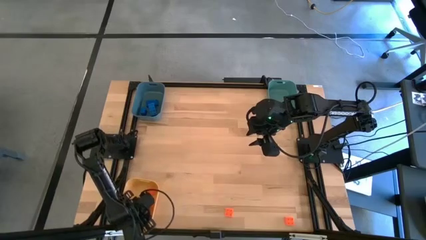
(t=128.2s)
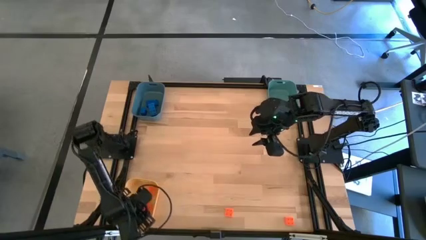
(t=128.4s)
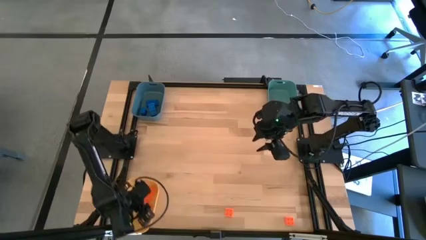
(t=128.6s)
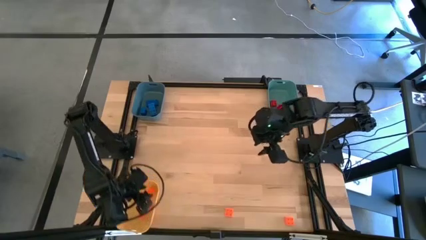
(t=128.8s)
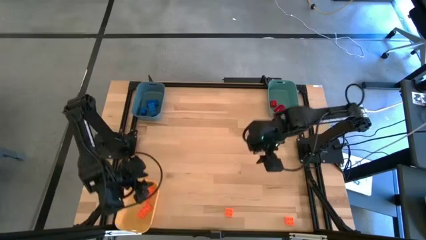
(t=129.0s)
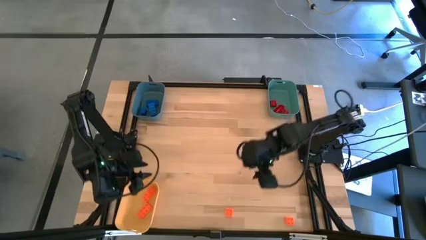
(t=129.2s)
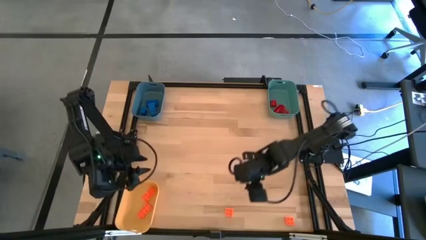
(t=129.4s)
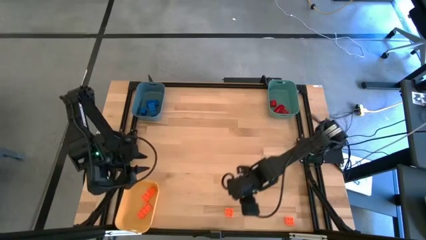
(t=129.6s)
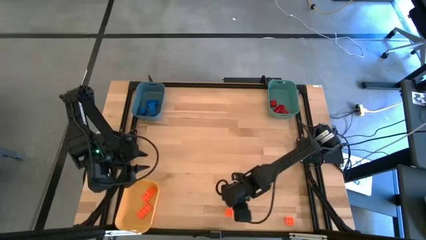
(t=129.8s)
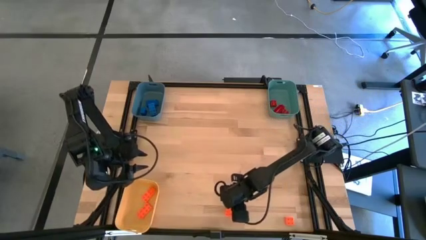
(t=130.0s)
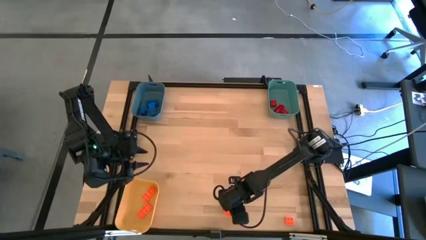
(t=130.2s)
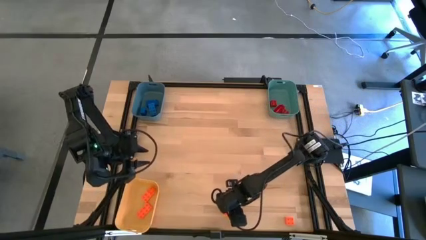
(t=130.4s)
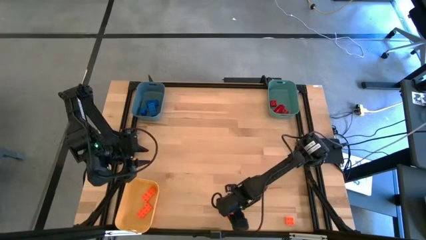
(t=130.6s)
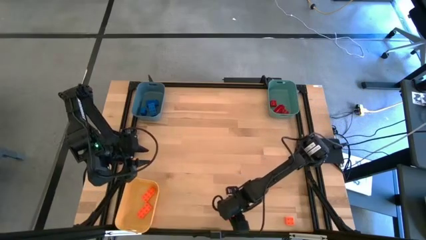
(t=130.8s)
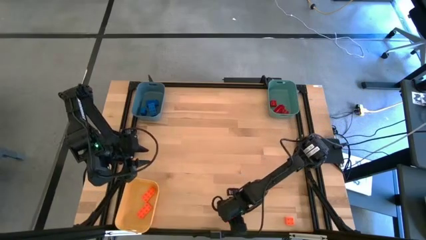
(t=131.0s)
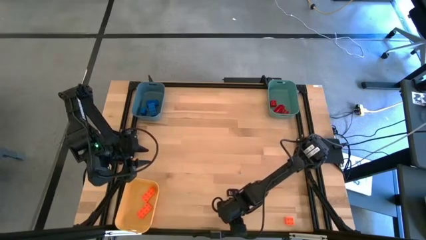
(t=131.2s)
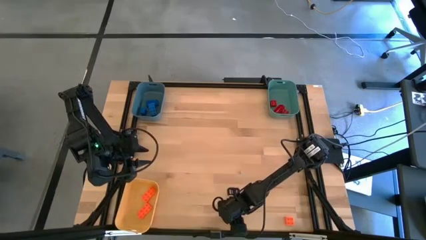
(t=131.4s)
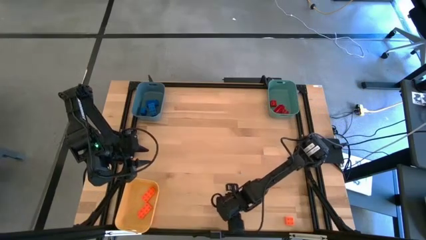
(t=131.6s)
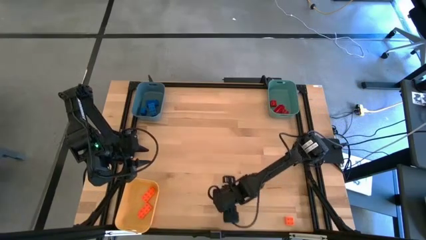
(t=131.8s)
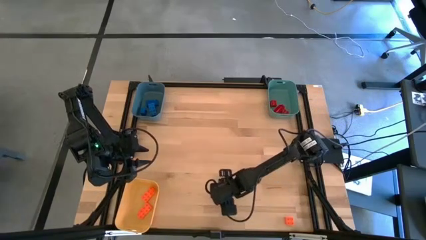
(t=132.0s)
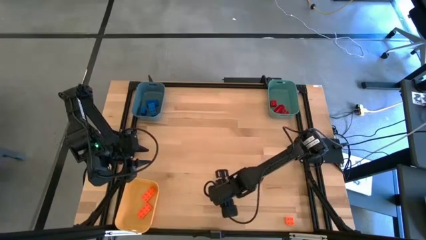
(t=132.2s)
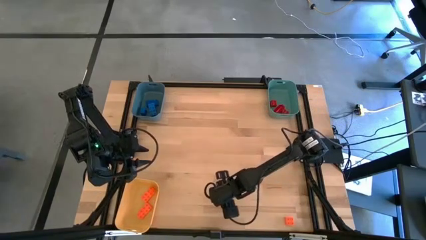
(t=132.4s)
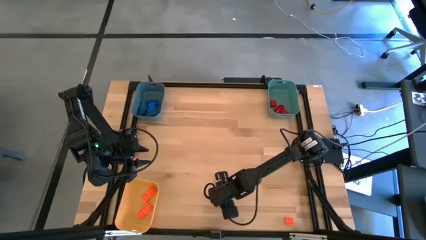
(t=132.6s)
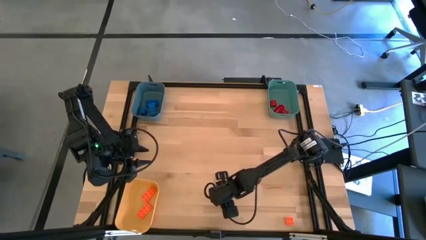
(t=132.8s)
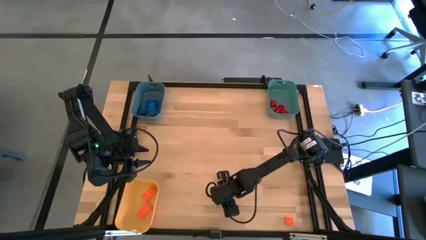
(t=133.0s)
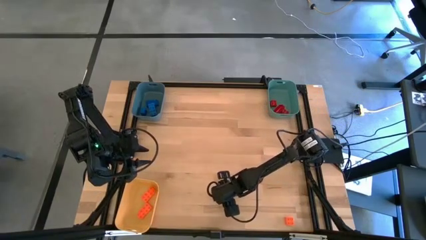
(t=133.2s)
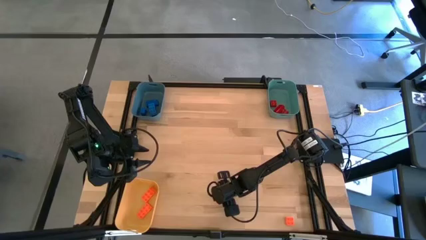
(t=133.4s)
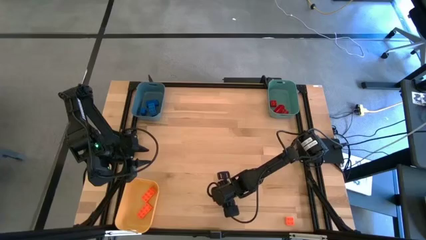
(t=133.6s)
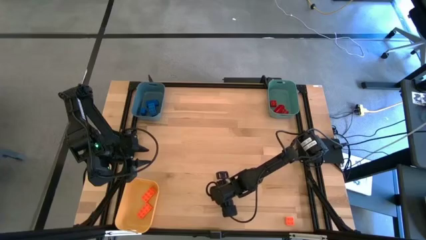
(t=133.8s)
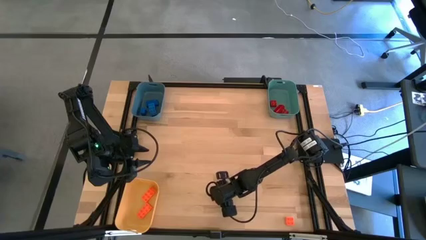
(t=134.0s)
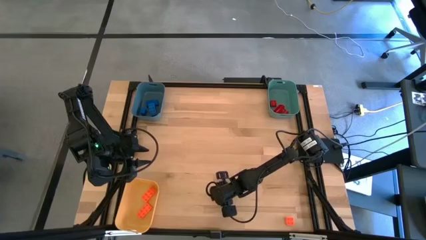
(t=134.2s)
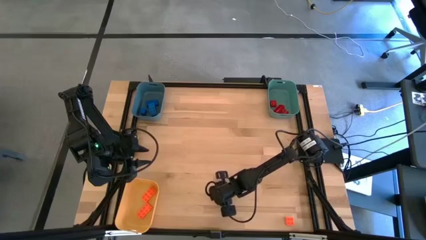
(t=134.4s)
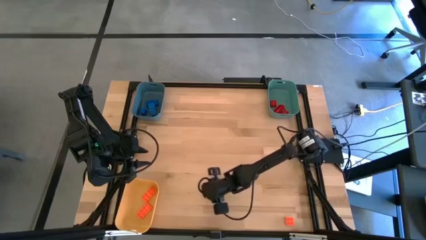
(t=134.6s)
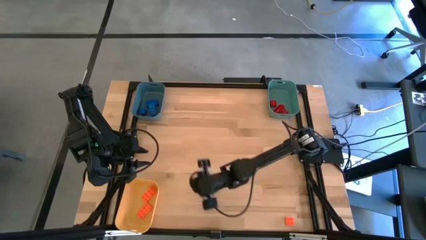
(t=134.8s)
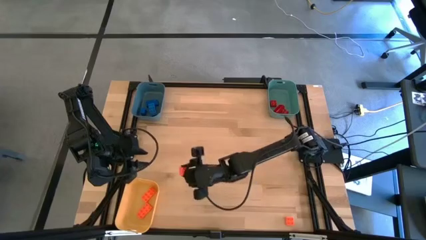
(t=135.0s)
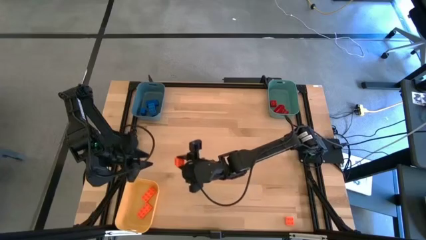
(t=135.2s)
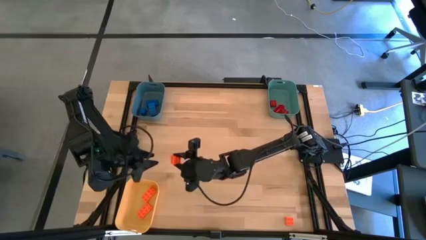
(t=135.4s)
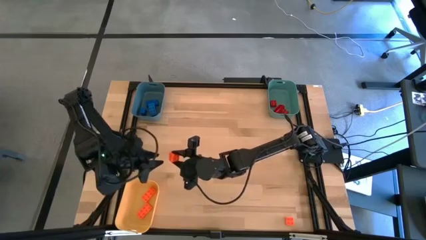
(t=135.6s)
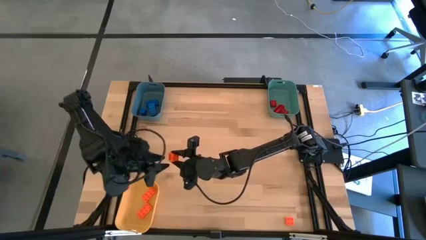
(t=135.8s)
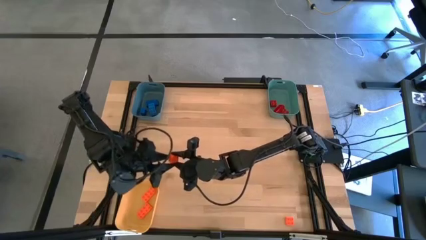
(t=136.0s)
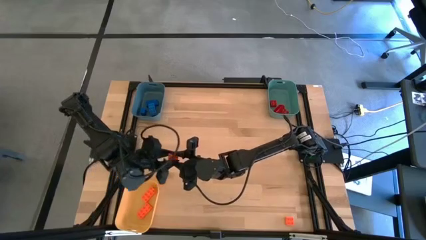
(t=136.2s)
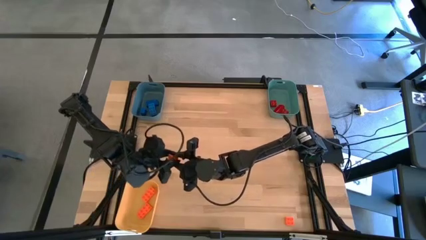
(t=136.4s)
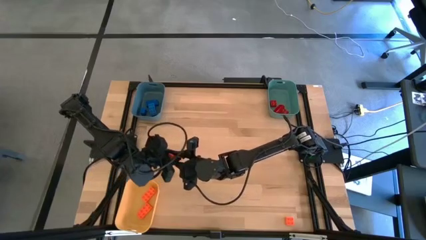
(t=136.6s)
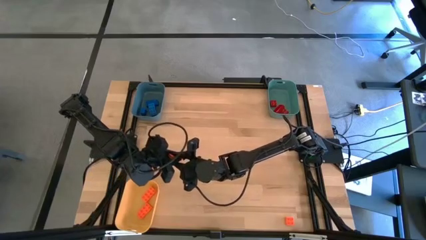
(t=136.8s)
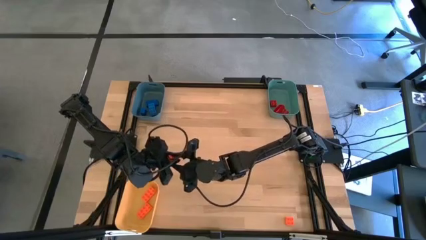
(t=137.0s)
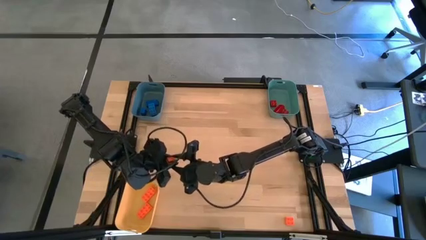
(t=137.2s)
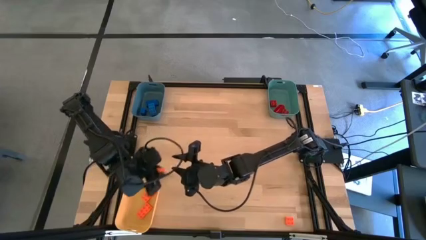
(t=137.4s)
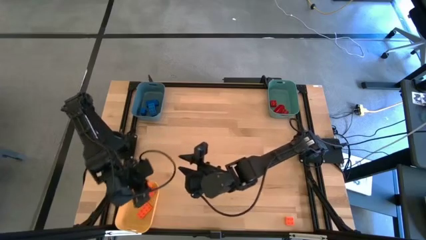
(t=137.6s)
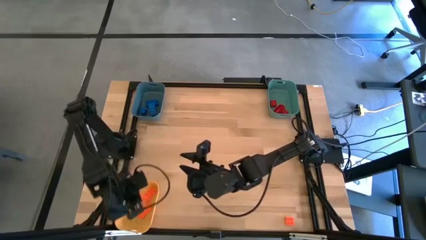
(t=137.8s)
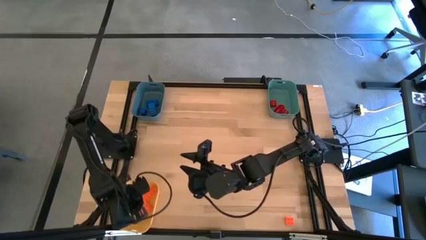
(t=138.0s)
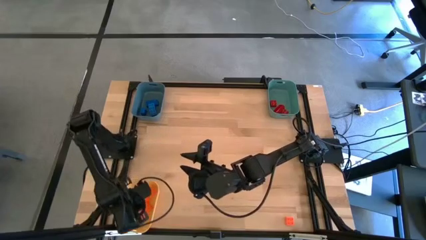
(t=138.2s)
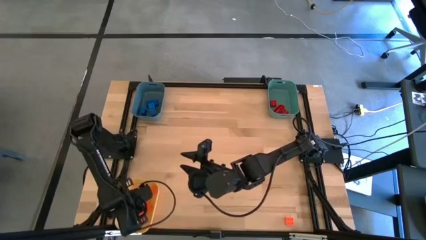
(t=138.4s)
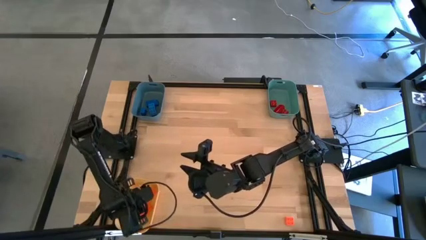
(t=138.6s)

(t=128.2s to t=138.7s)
Task: Sort & place blocks by color
Put the left orange game piece into the yellow bin
